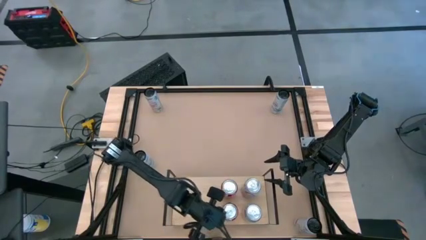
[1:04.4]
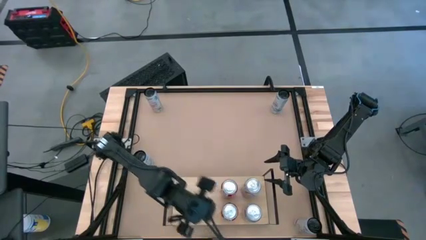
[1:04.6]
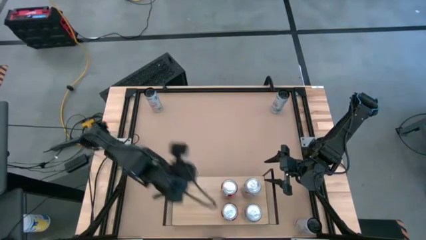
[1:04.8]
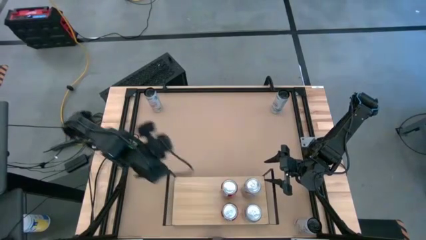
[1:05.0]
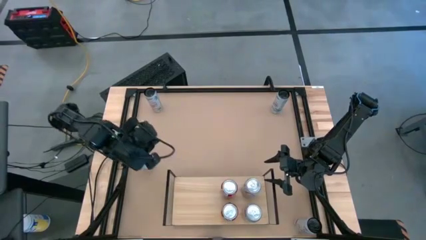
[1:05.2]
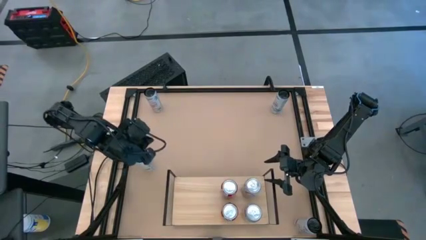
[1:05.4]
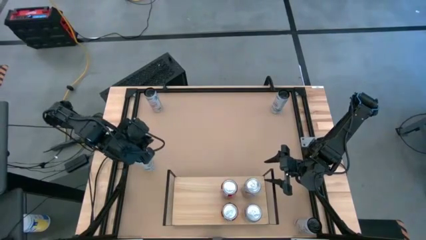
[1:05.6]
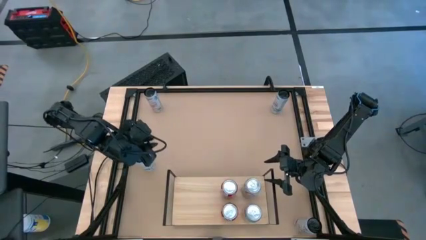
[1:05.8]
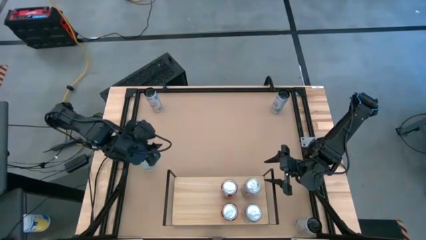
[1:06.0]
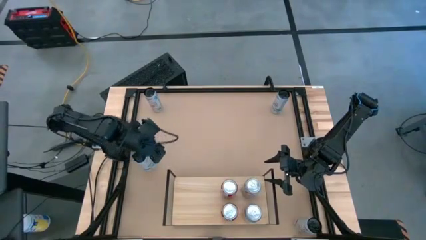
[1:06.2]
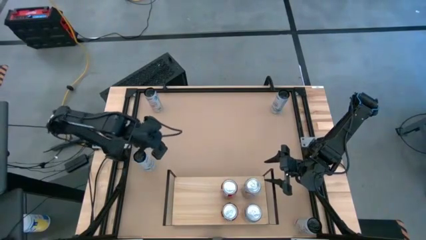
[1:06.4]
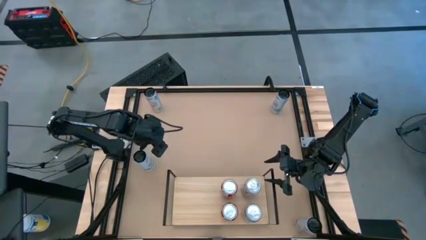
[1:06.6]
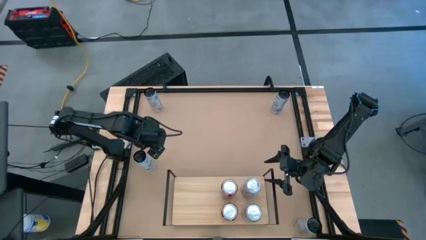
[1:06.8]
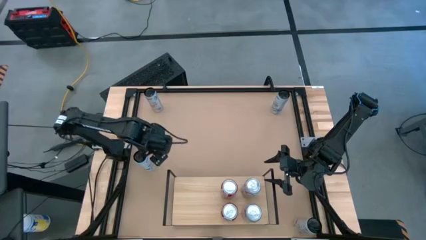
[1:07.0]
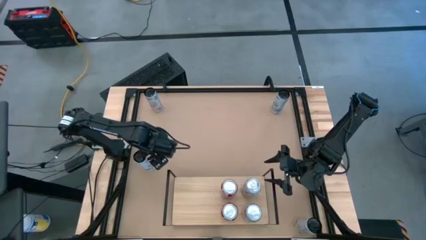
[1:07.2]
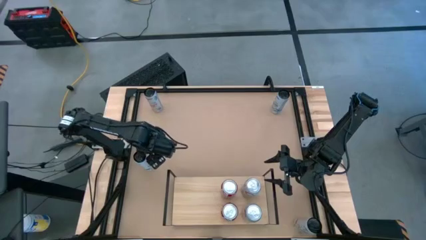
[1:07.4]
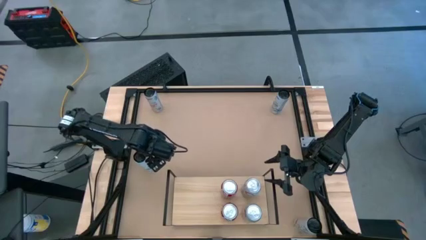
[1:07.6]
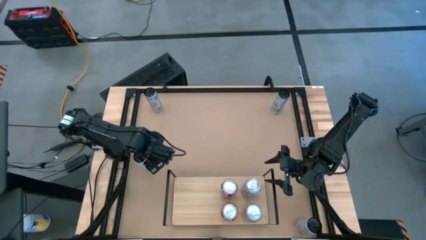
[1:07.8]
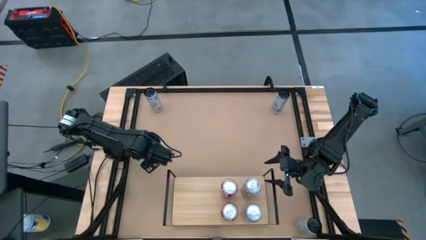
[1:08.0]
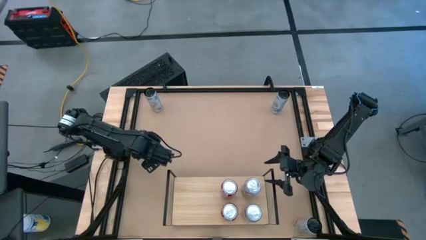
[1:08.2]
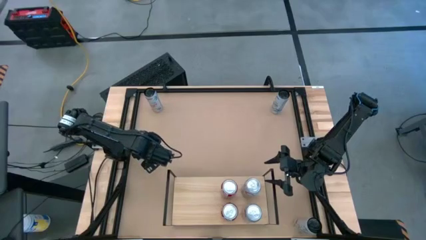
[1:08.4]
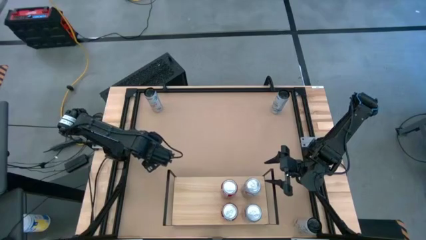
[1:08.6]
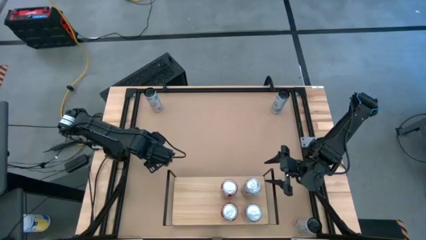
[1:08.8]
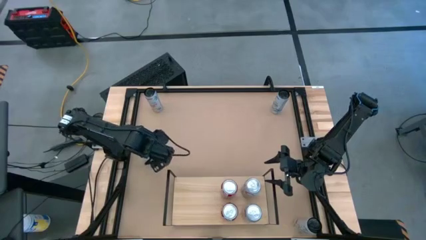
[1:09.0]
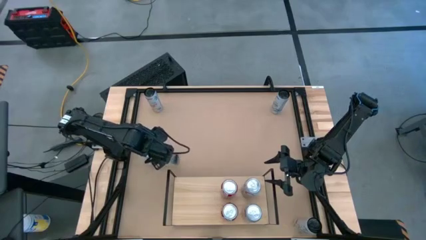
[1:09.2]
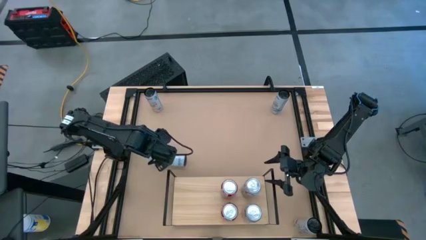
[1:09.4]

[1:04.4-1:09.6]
Task: Place canned beverage on shelf
Put the bottom white blue soda can on the shelf
